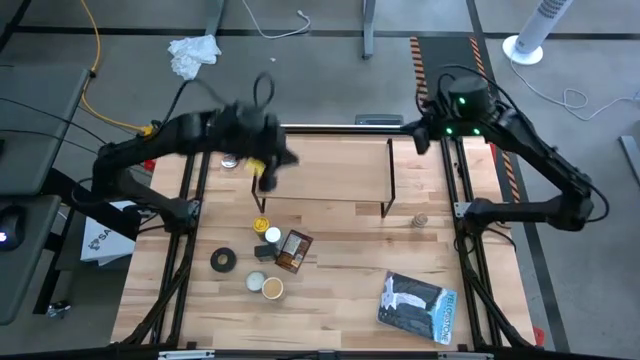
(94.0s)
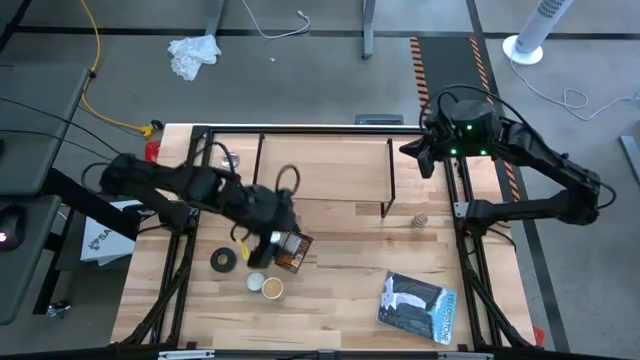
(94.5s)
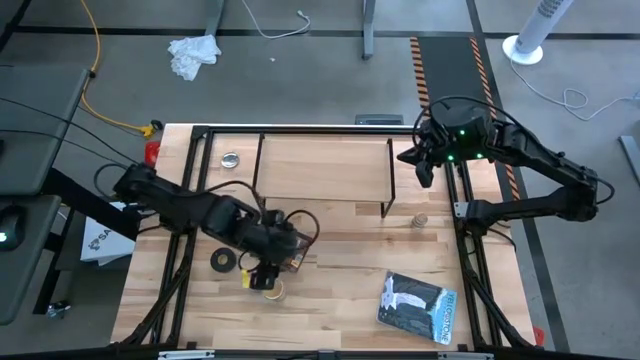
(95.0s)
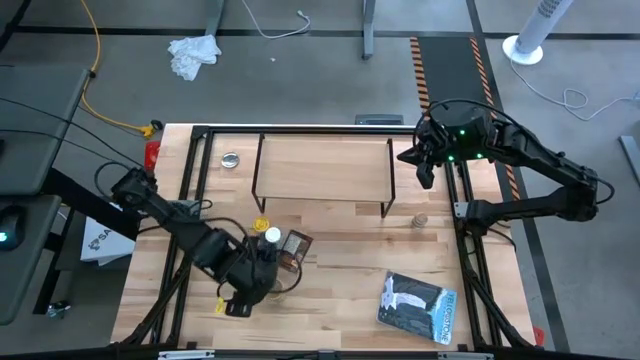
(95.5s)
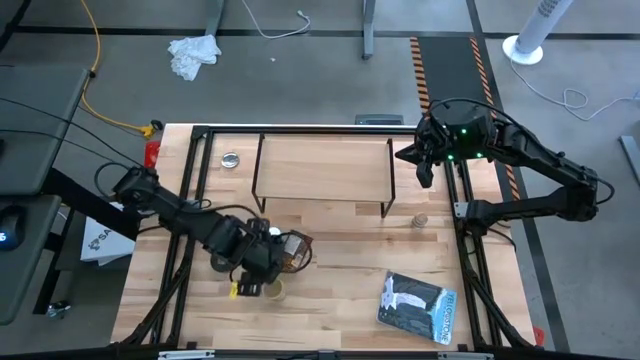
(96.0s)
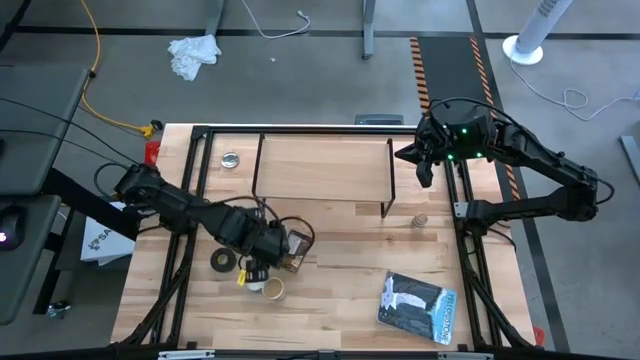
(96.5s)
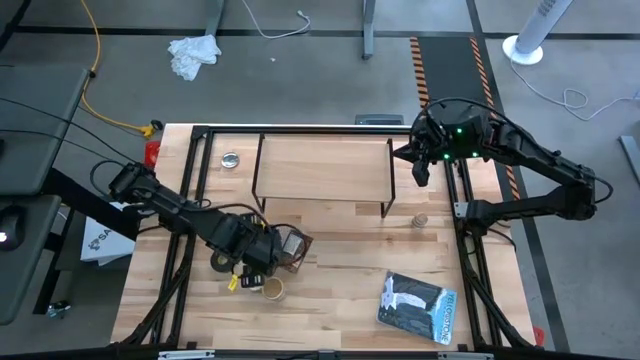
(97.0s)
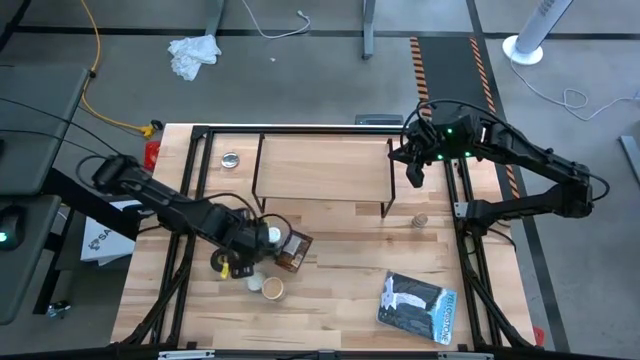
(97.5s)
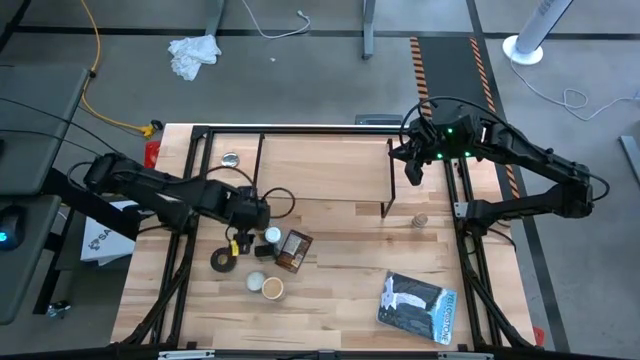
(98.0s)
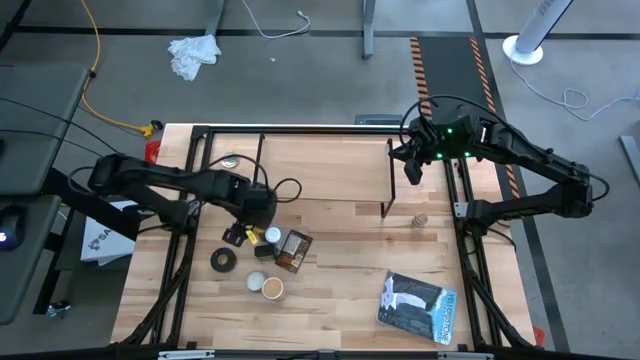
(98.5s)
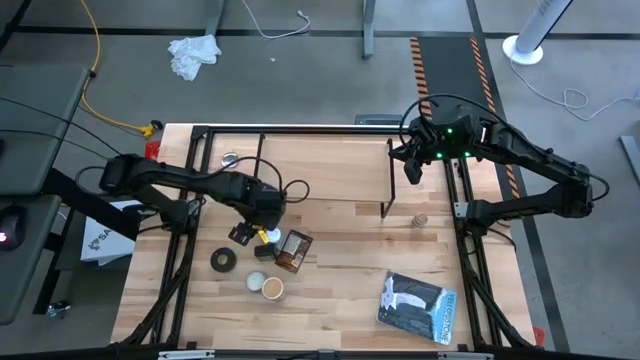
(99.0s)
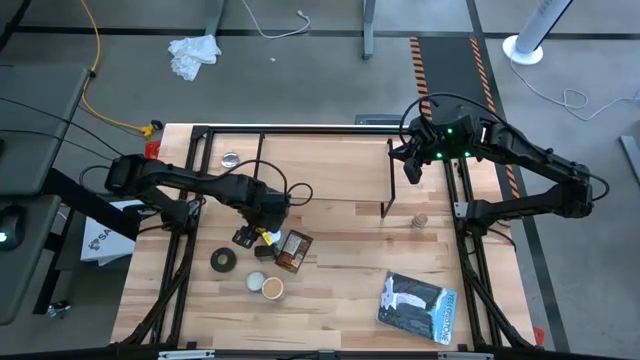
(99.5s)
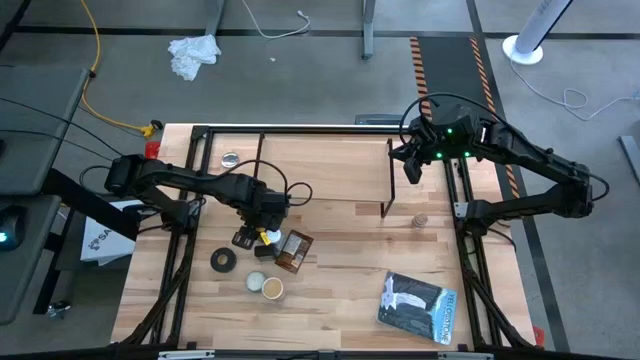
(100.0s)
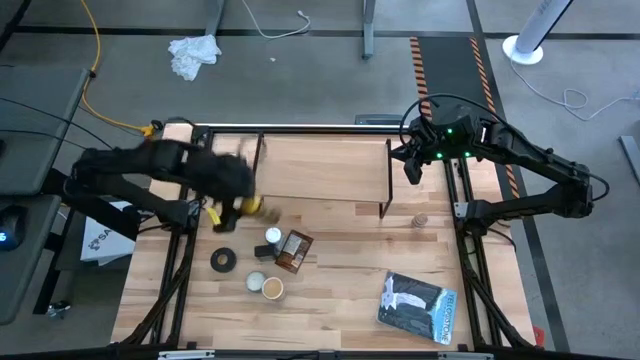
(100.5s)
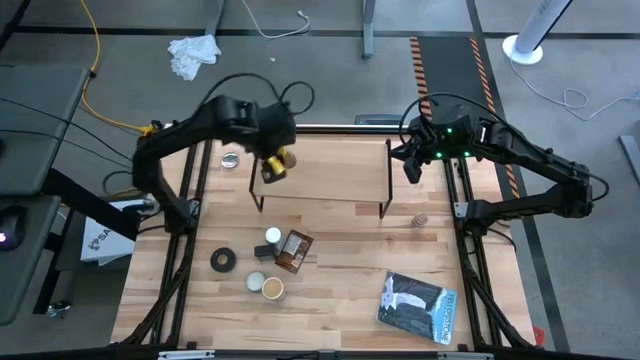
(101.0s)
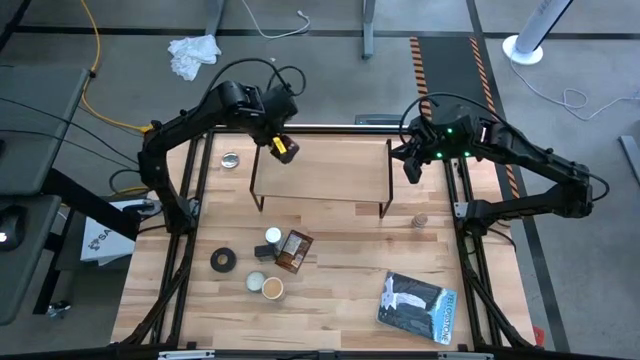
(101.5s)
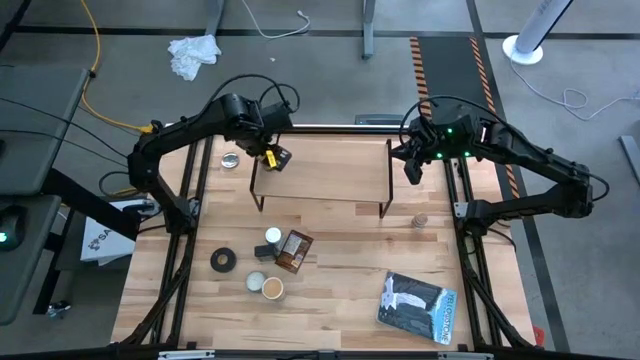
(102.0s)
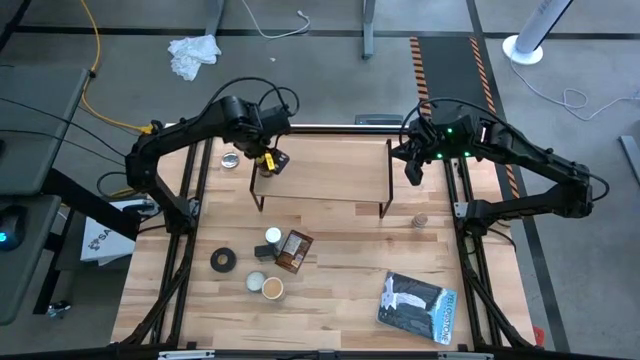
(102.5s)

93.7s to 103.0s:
Task: Shelf spices
Put the yellow seasoning bottle on the shelf

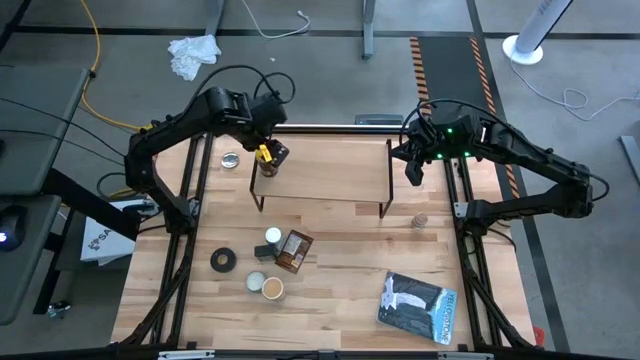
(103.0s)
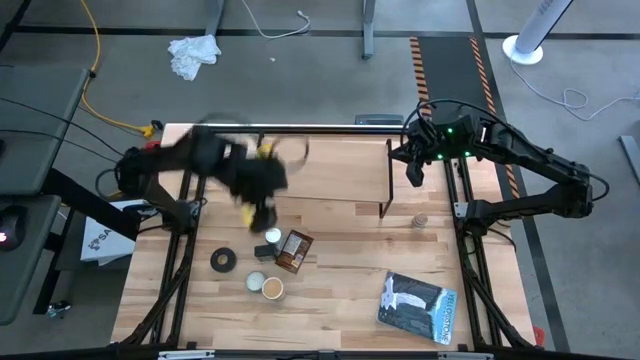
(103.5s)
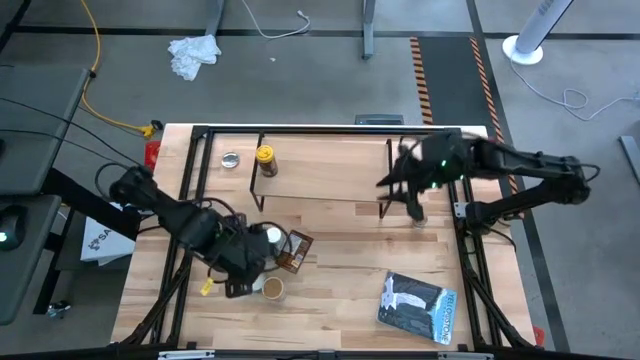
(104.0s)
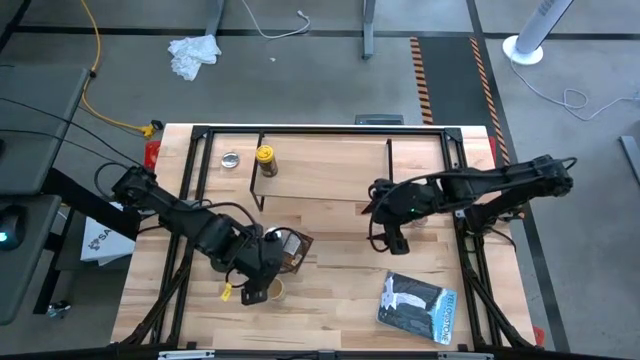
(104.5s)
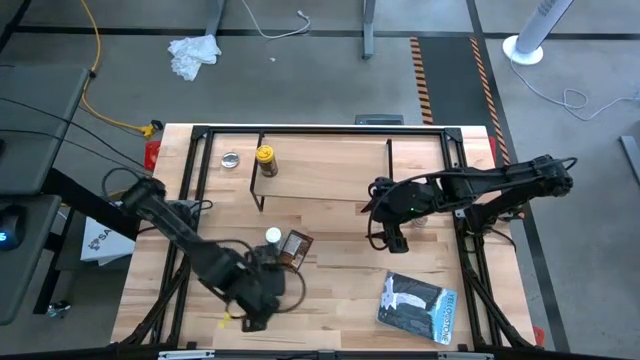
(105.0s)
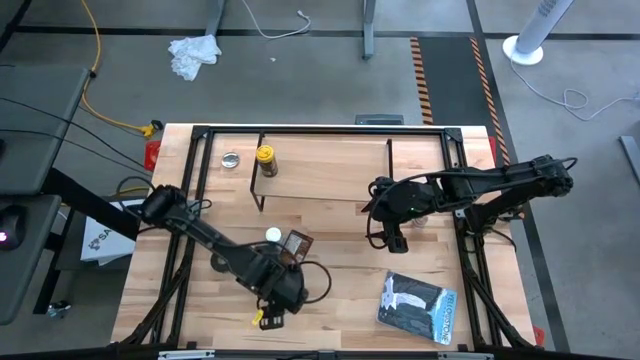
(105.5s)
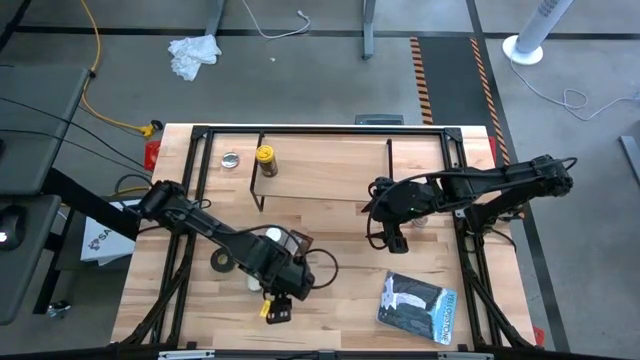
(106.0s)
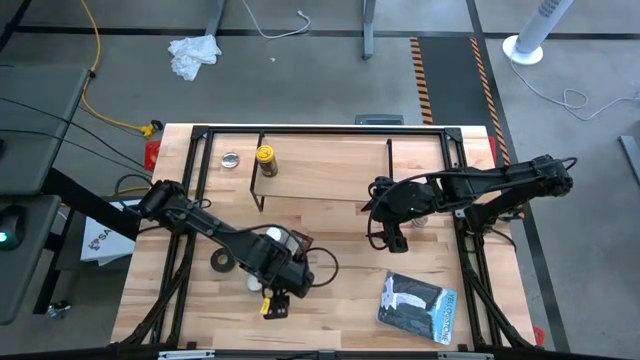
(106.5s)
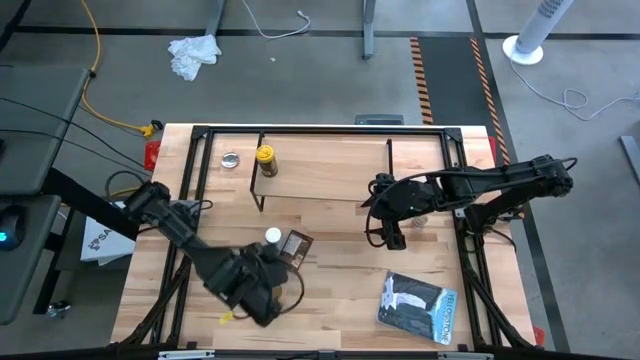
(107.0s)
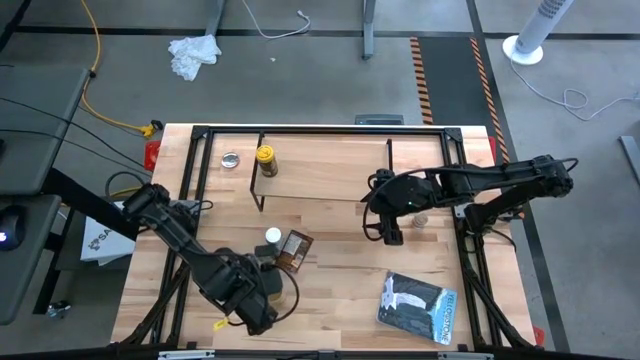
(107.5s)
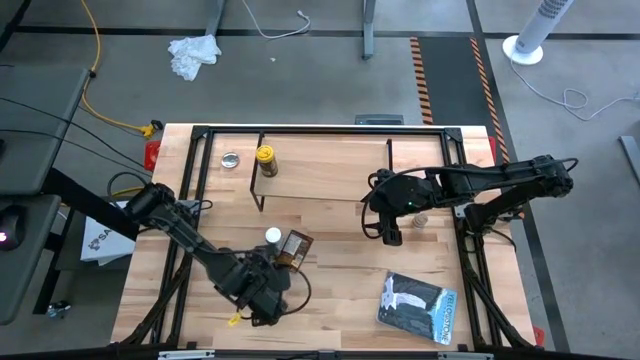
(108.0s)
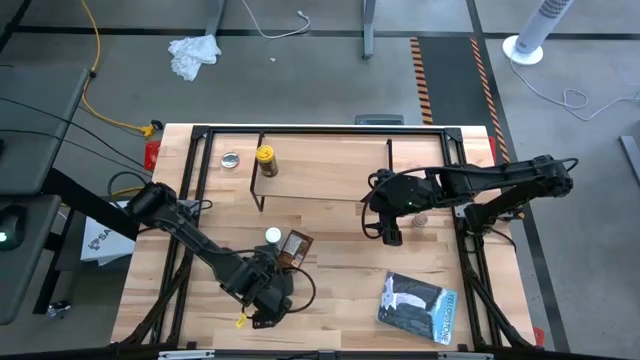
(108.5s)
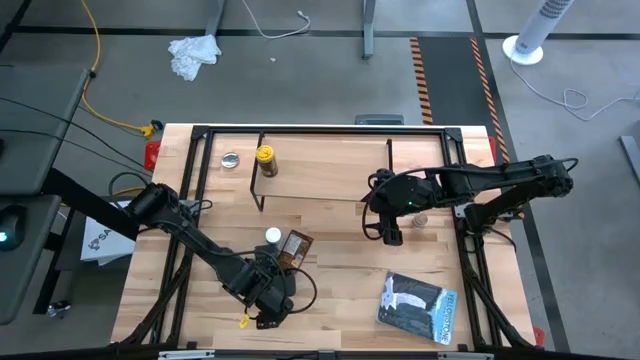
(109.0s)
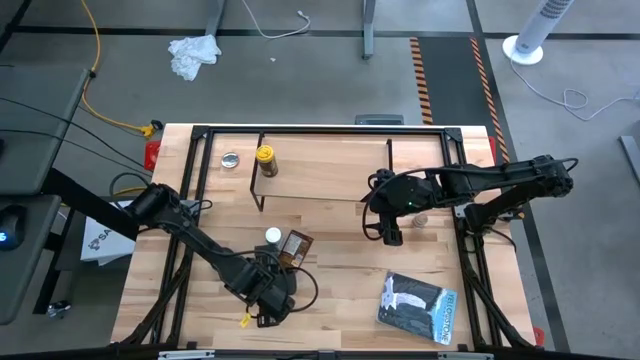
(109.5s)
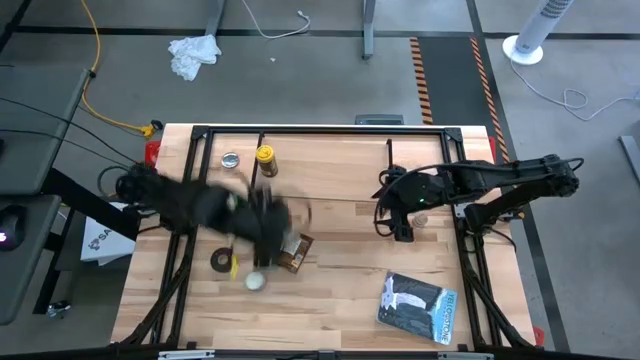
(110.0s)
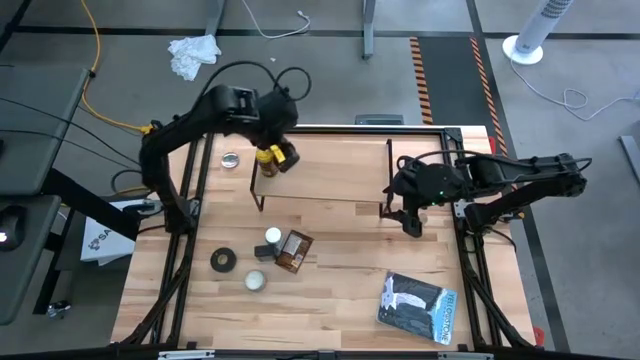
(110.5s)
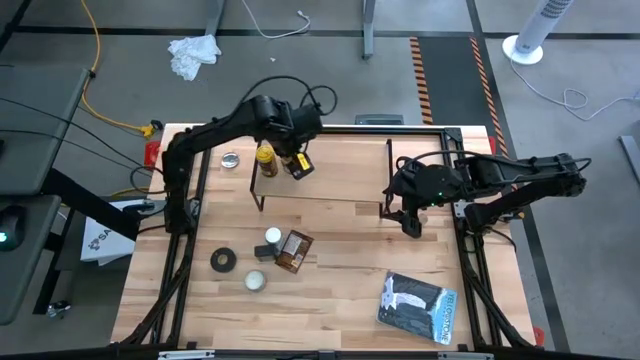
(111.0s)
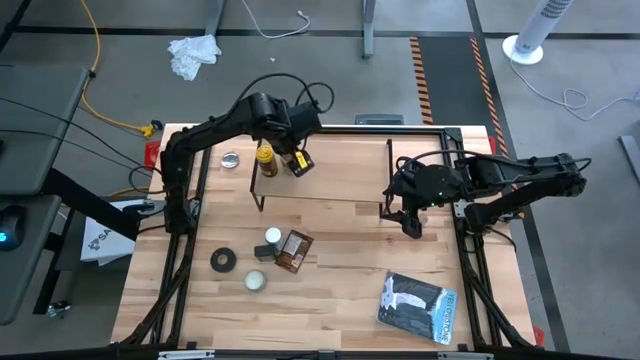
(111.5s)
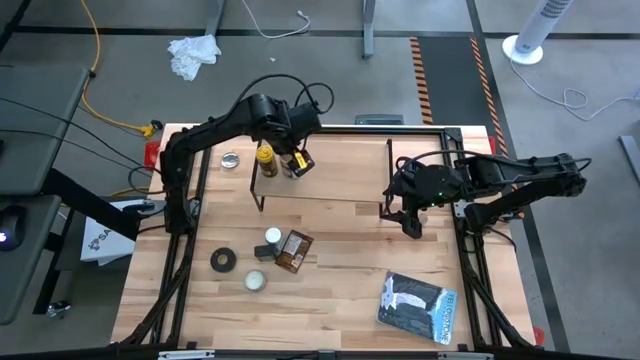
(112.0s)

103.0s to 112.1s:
Put the gold seasoning bottle on the shelf

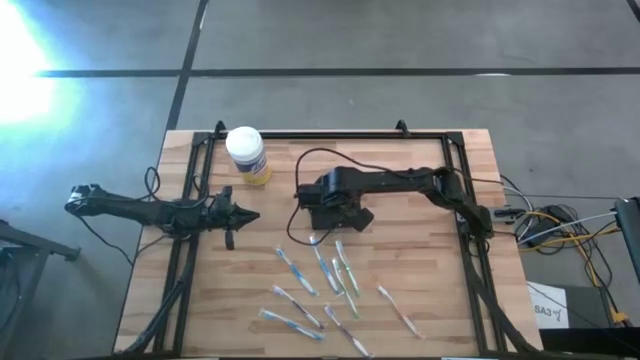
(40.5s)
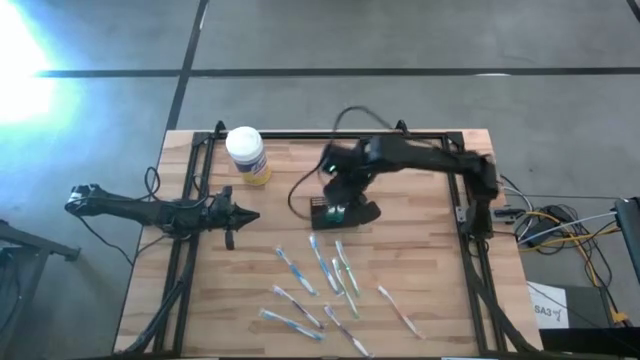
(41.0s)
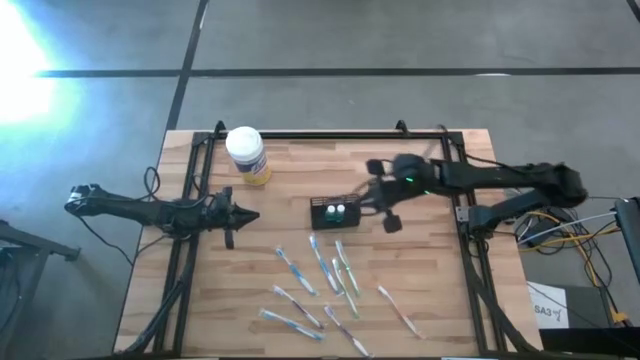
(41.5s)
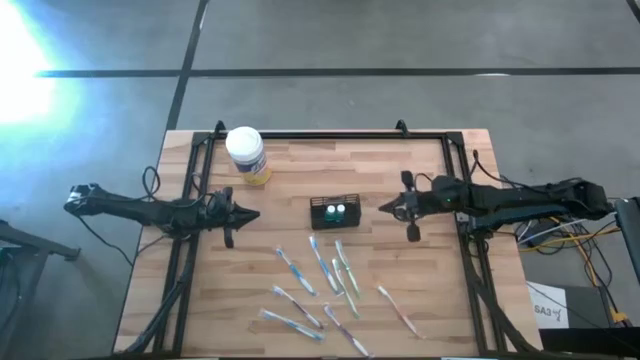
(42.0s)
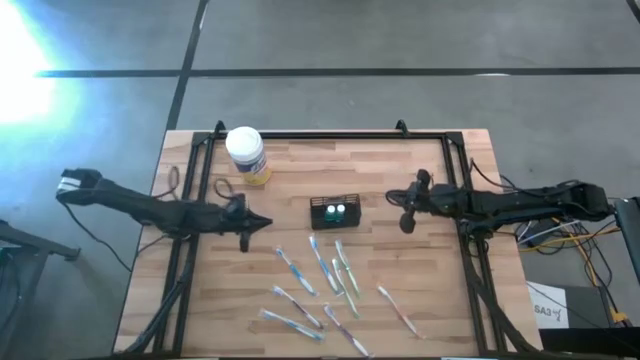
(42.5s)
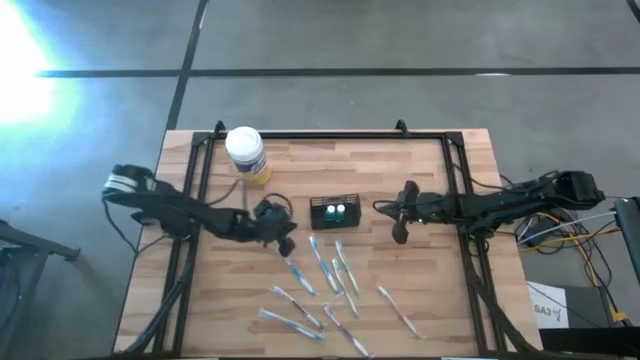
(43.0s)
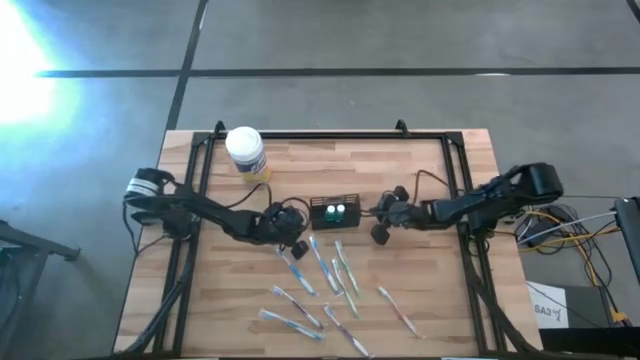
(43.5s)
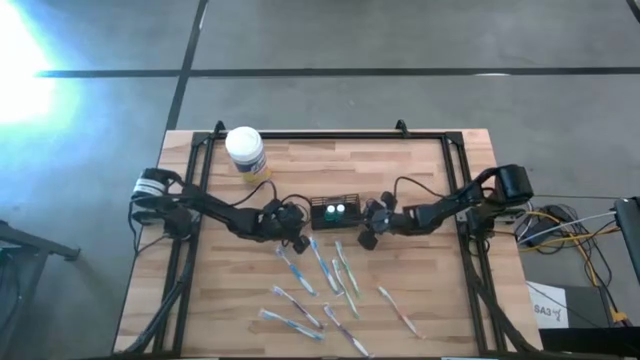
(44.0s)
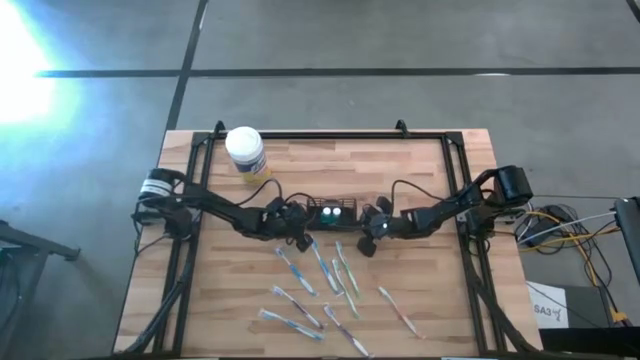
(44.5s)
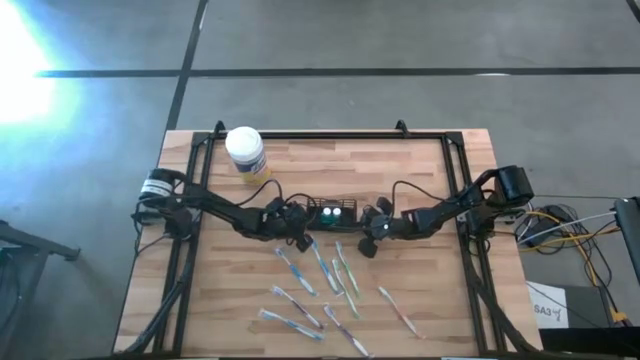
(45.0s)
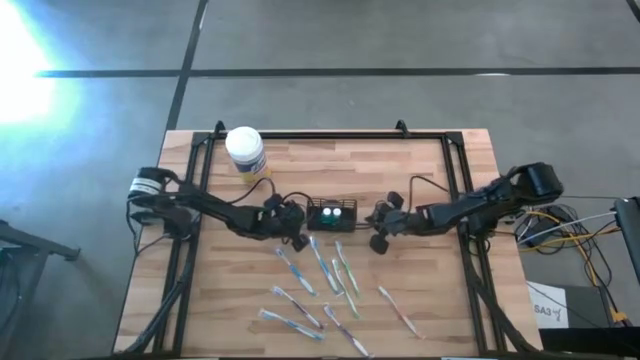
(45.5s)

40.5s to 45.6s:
Task: Pick & Place toothbrushing station
Adjust the black mesh organizer
